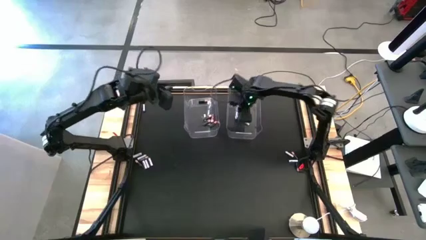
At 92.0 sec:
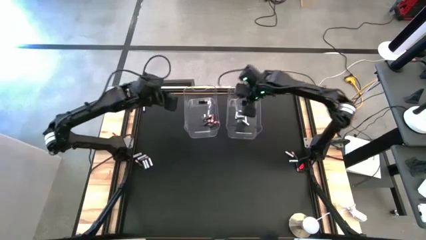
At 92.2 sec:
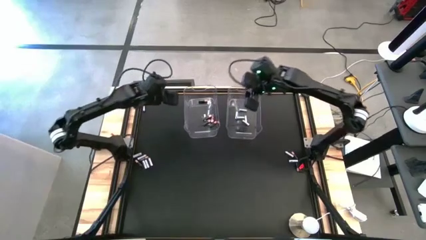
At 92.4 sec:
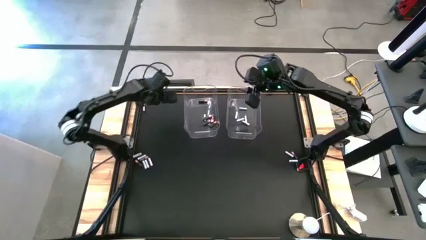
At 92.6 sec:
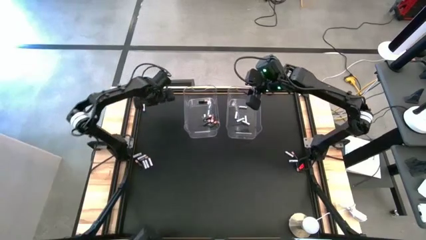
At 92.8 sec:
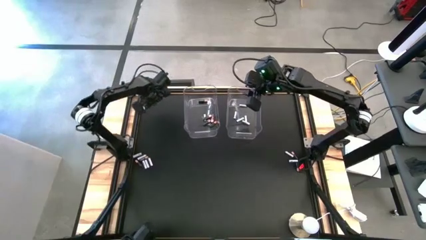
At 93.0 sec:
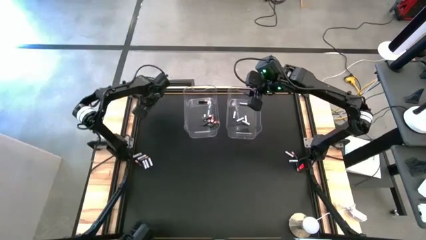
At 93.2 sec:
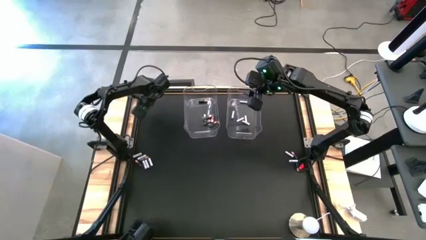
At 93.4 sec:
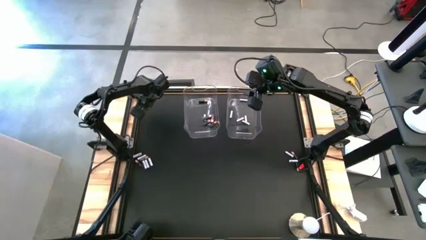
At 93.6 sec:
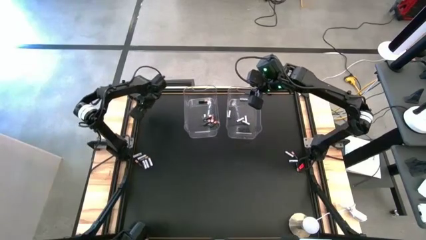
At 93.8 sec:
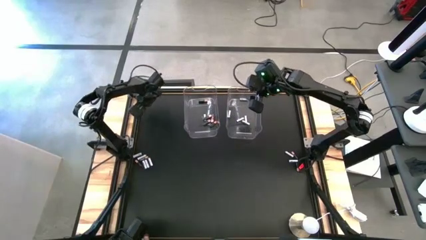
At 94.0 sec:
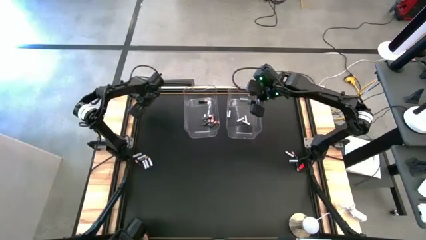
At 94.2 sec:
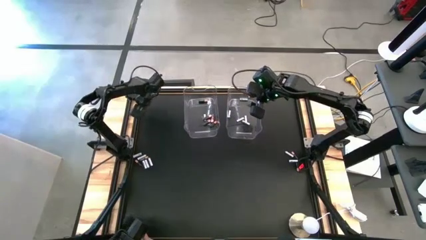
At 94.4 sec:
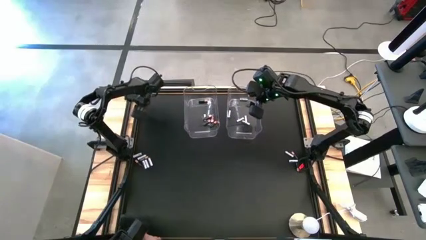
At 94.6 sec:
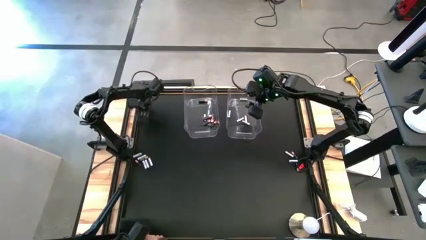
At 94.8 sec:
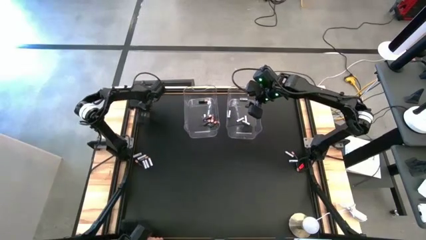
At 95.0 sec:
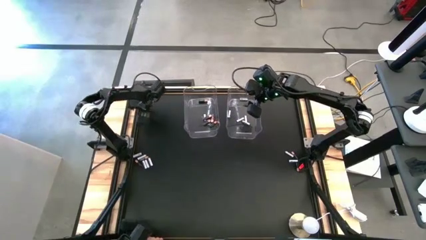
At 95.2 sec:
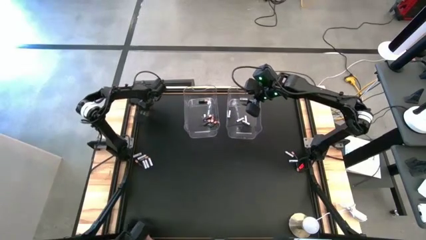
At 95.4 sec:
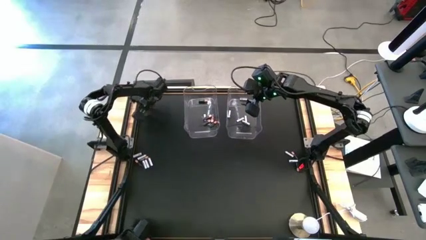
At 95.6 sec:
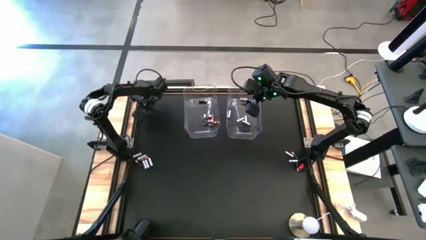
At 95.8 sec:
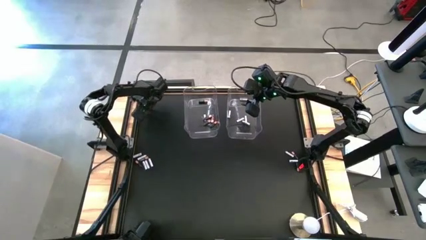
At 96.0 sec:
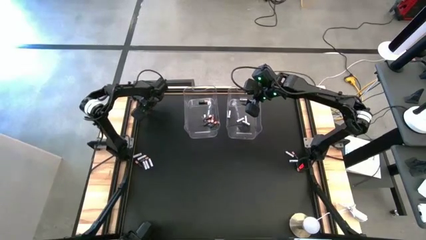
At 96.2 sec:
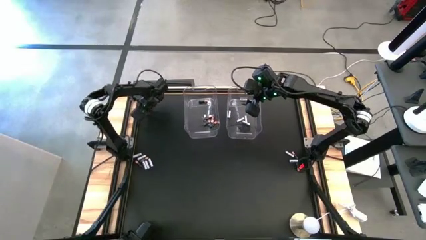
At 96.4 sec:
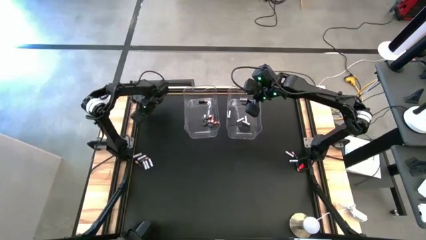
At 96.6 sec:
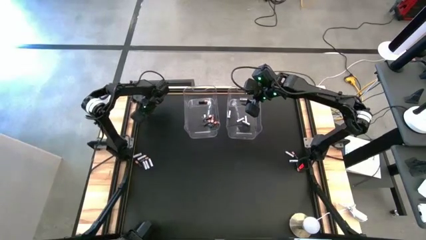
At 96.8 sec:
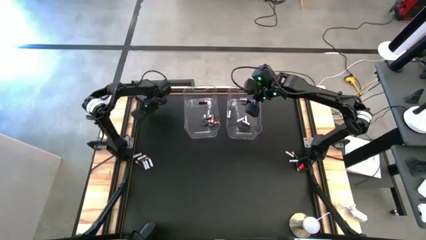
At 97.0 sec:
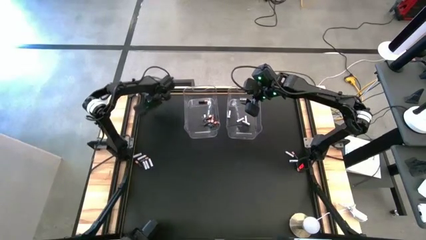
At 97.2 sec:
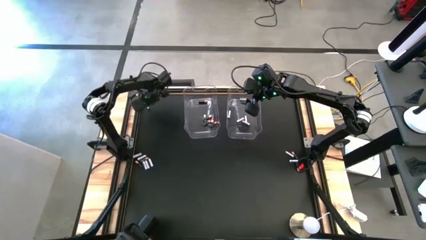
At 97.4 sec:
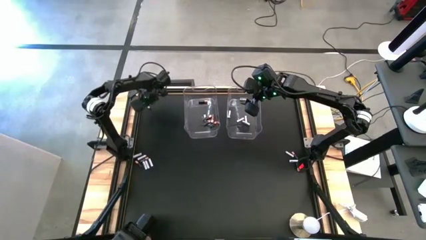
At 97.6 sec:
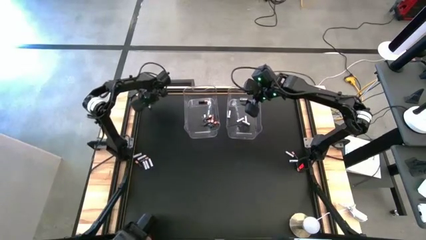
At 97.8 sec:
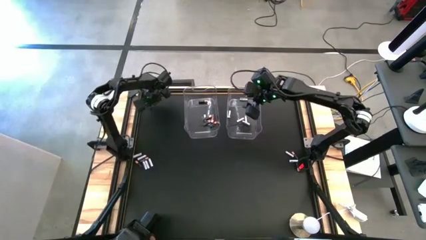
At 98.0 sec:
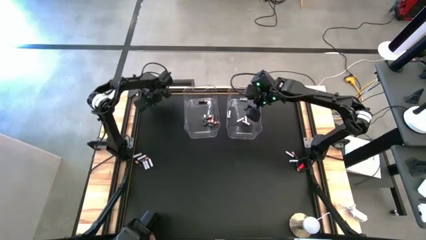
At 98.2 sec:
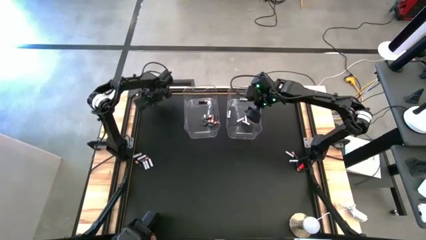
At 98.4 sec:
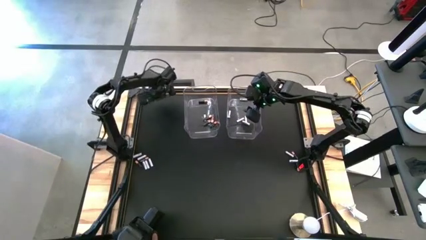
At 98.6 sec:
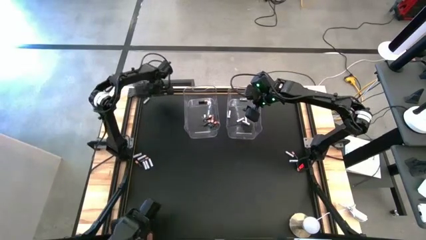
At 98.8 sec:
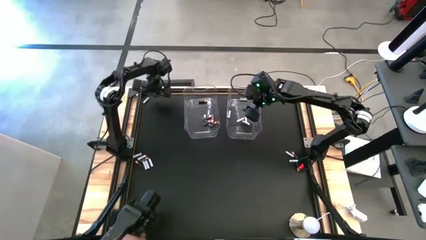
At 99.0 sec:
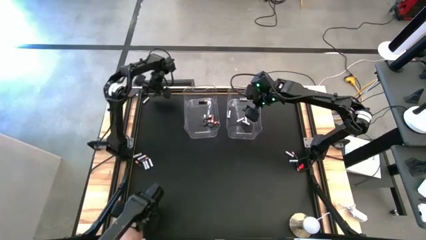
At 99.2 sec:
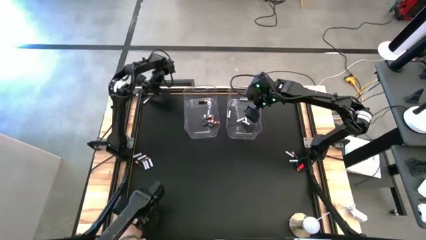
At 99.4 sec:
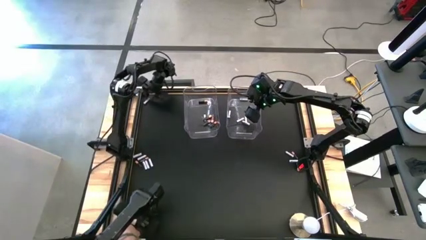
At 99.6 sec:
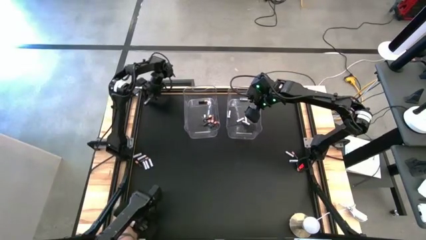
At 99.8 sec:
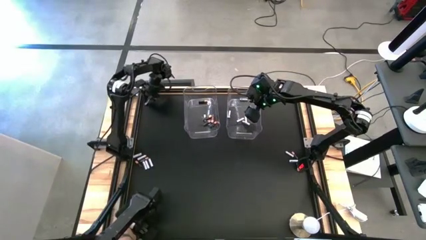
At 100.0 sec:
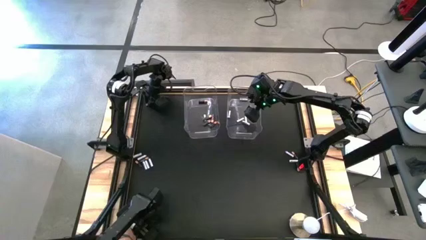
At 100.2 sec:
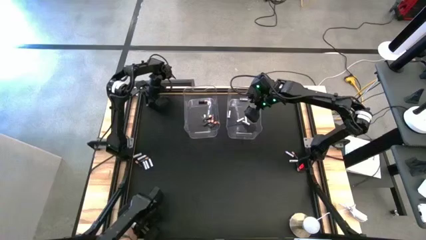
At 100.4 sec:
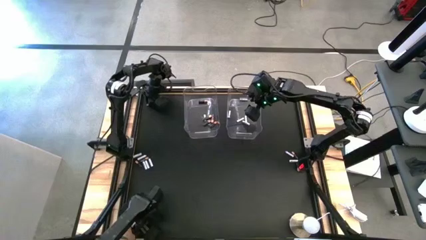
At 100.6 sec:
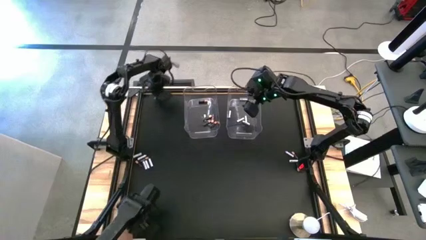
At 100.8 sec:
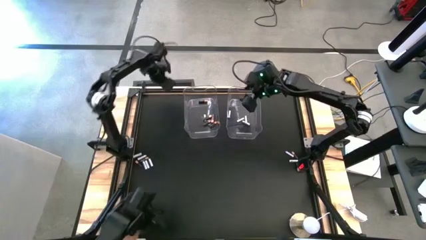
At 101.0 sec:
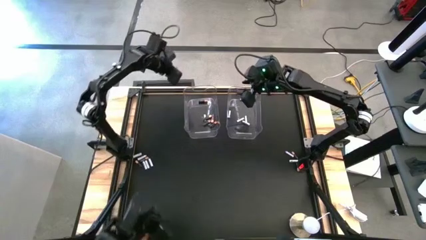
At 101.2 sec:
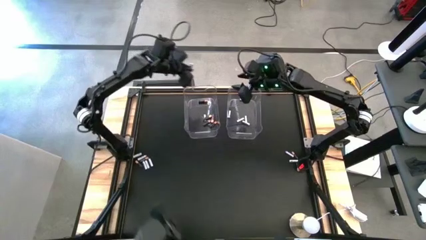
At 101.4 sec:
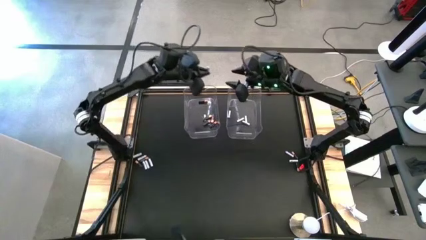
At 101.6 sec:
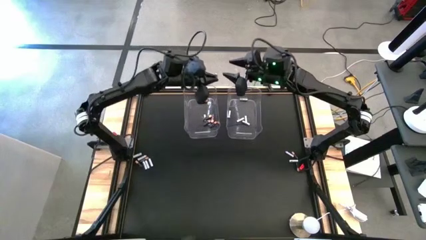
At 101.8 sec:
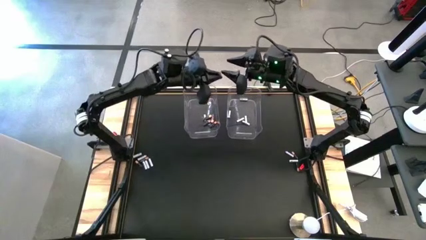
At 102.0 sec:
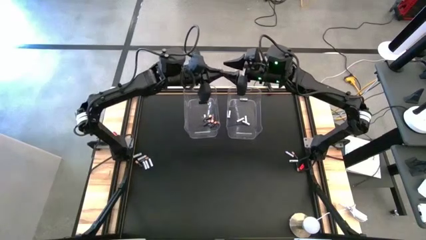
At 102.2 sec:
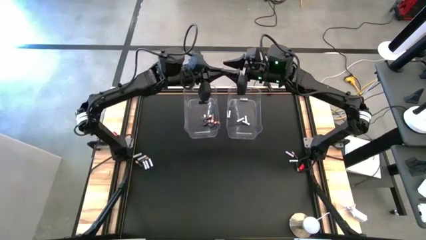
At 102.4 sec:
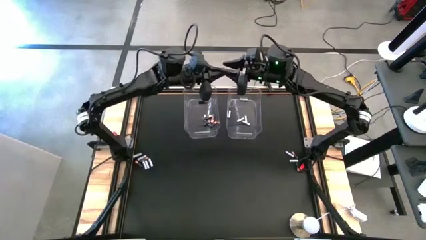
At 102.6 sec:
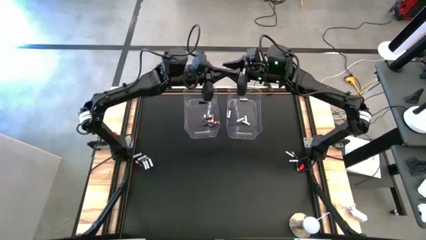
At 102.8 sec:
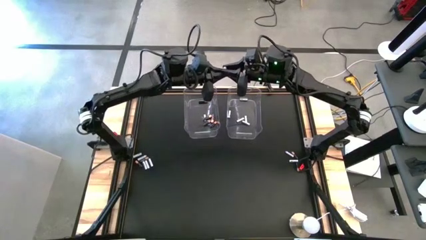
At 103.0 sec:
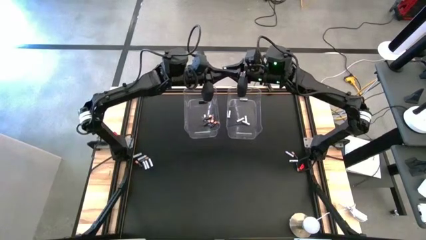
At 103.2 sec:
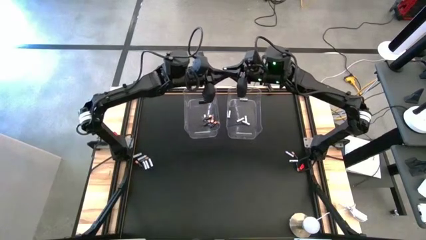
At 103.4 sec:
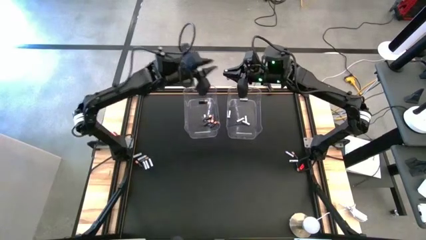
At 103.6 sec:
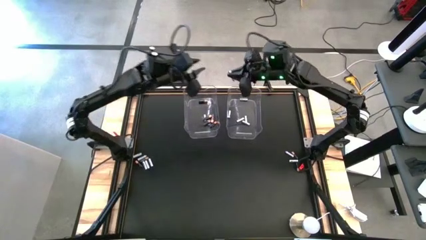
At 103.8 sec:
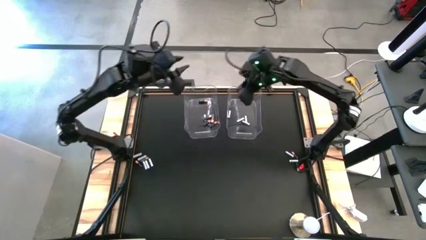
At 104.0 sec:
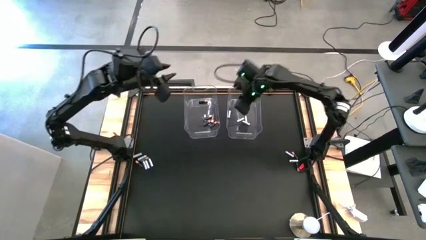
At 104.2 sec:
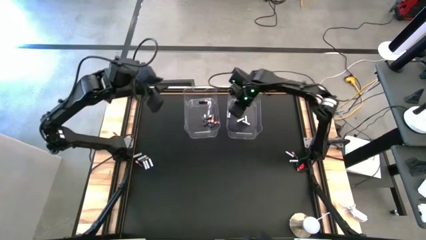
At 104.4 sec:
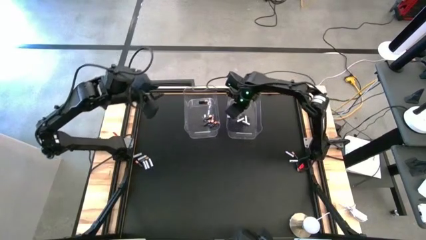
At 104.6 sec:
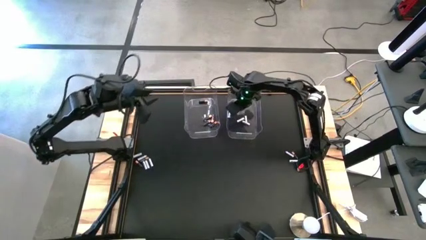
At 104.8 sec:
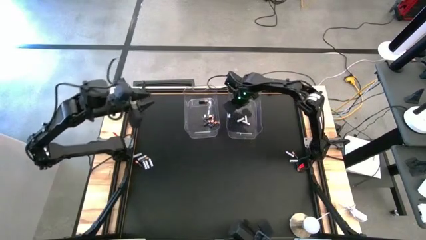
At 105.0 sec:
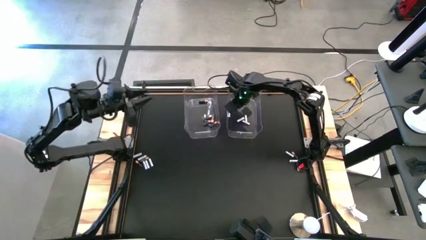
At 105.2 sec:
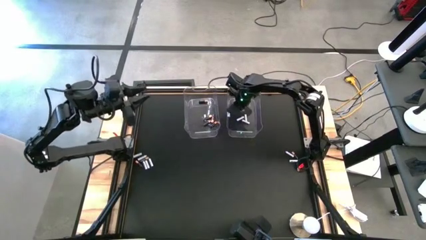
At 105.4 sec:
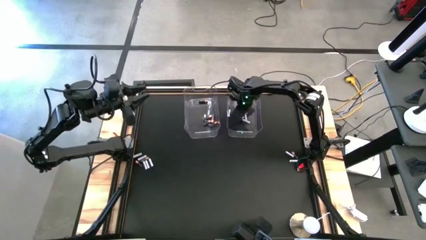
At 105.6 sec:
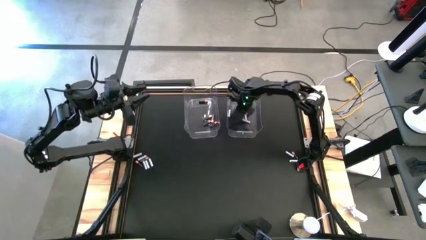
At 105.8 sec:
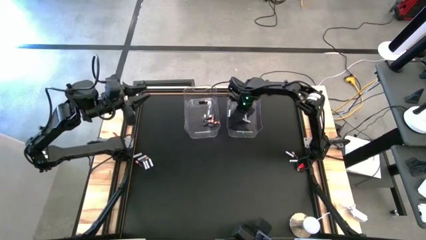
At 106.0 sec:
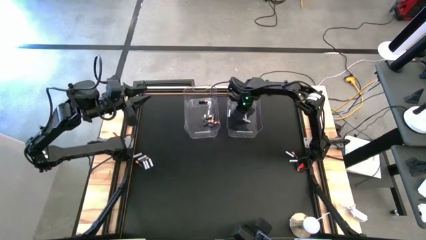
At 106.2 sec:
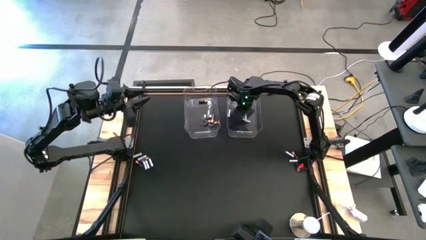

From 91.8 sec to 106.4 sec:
Task: Sort batteries
Put the white battery into the right transparent bin

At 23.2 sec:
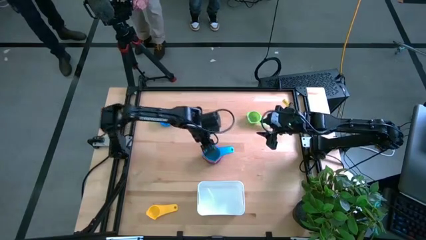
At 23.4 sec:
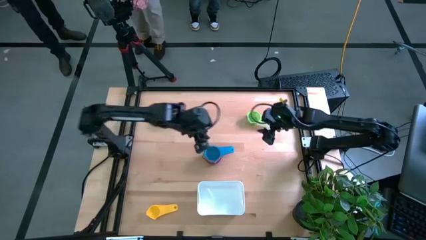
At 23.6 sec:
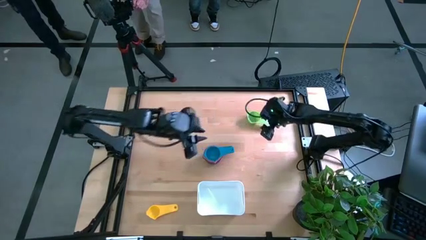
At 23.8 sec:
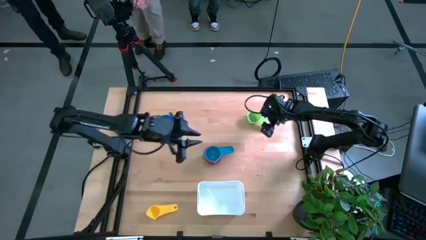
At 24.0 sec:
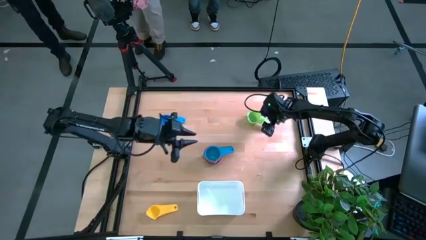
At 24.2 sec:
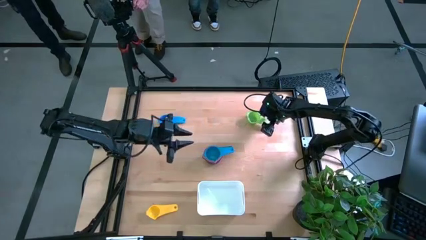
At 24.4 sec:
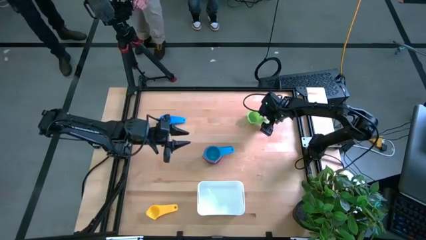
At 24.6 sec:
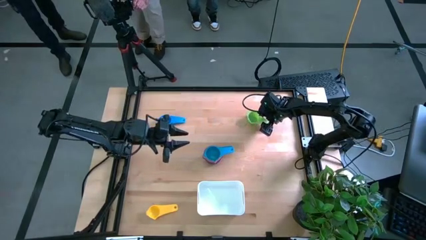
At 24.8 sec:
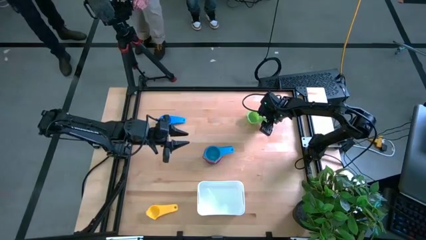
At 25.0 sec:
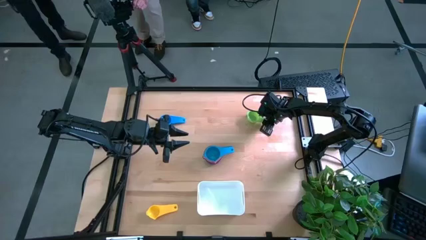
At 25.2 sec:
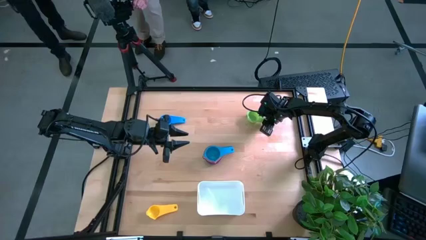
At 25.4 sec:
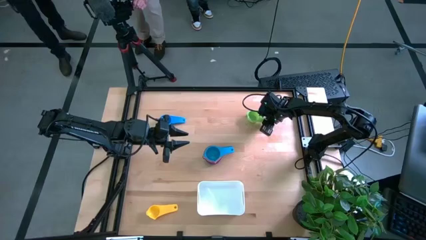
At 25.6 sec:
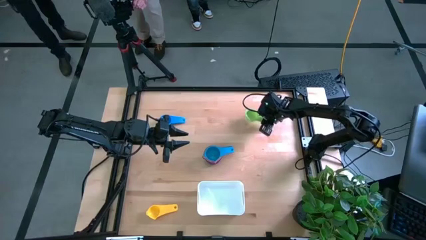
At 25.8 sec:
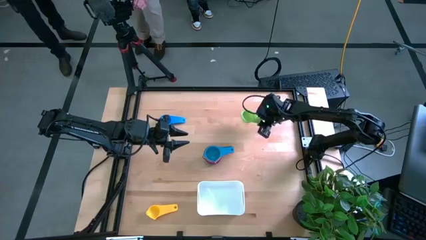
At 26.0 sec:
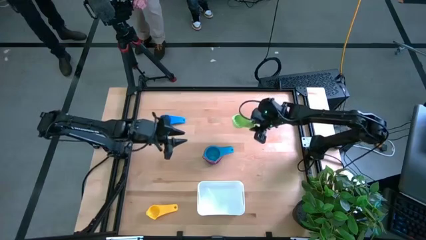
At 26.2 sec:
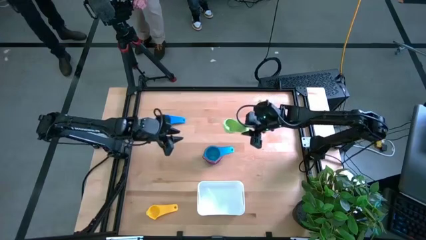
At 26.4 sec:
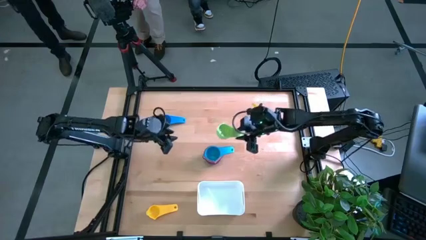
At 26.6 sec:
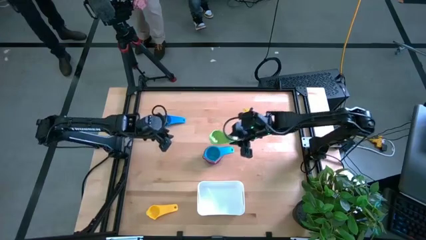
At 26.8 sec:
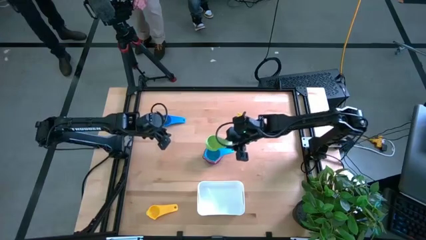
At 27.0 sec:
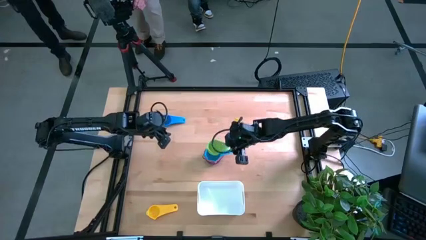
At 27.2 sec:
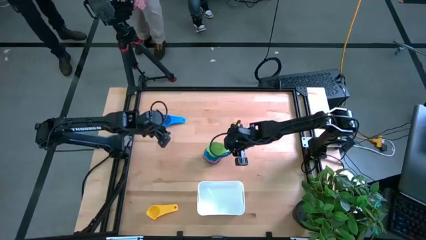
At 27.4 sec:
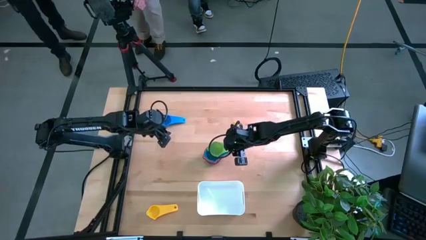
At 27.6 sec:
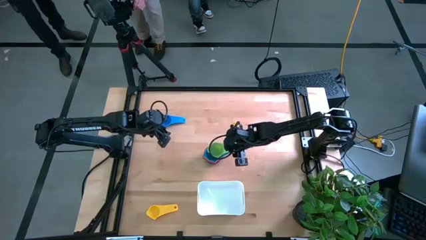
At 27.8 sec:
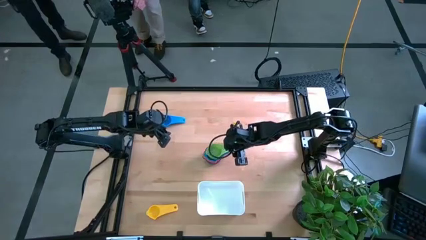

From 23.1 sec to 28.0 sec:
Task: Nest measuring cups in basket
Stack the green measuring cup on the light blue measuring cup
